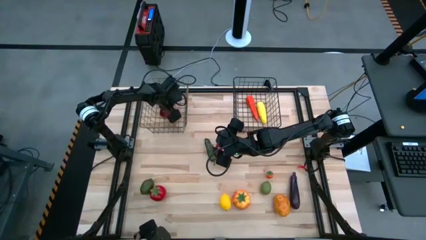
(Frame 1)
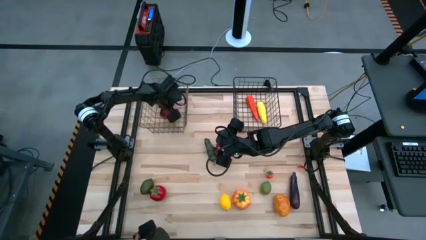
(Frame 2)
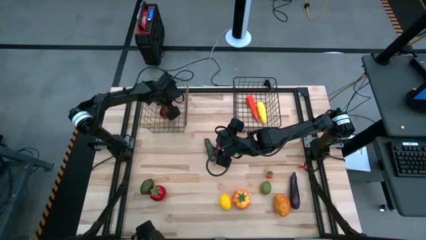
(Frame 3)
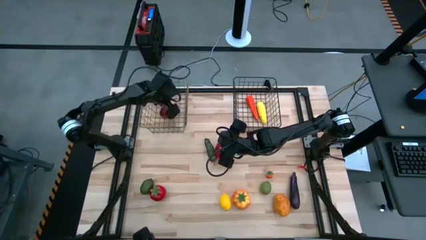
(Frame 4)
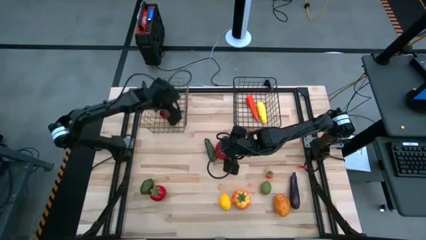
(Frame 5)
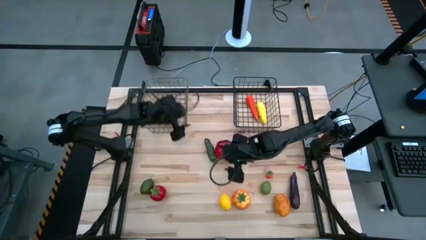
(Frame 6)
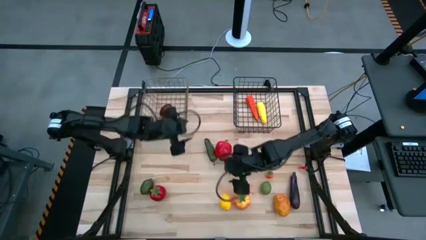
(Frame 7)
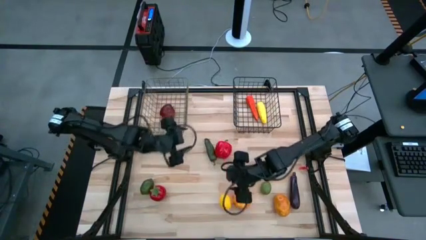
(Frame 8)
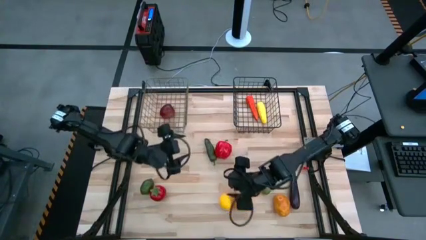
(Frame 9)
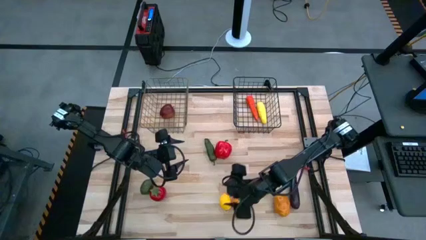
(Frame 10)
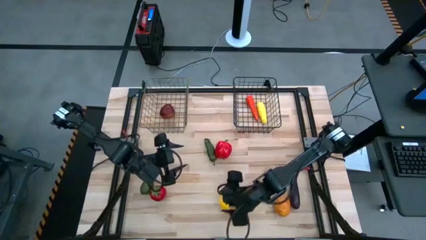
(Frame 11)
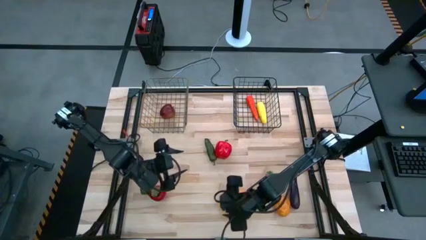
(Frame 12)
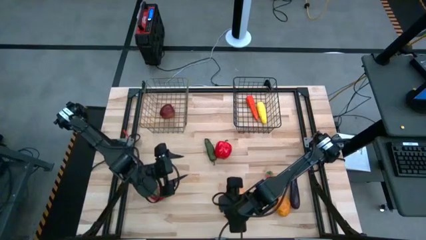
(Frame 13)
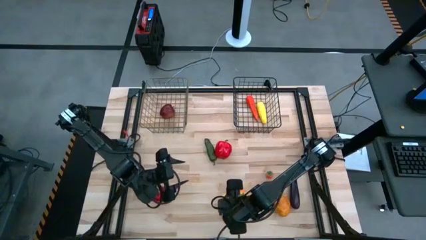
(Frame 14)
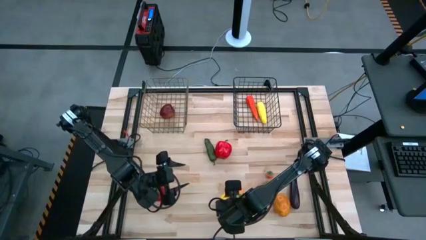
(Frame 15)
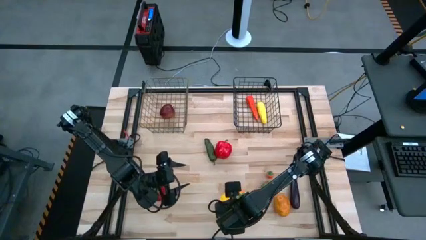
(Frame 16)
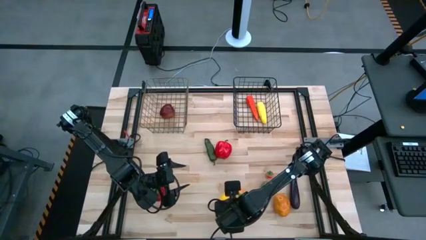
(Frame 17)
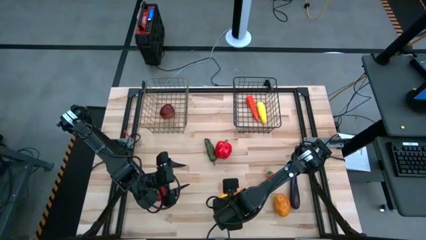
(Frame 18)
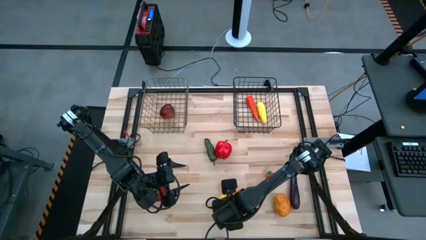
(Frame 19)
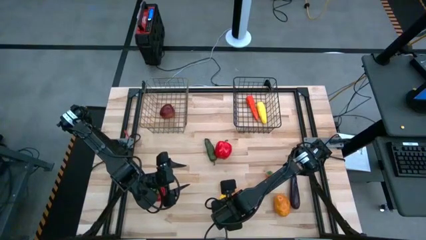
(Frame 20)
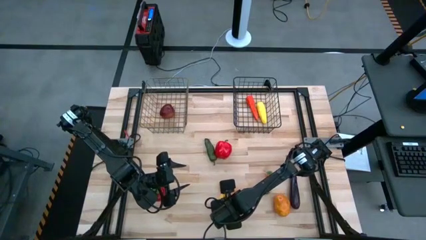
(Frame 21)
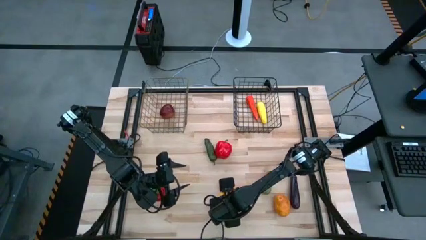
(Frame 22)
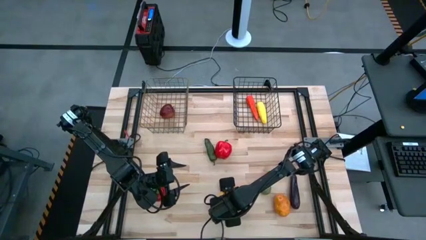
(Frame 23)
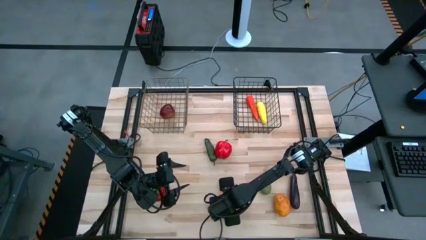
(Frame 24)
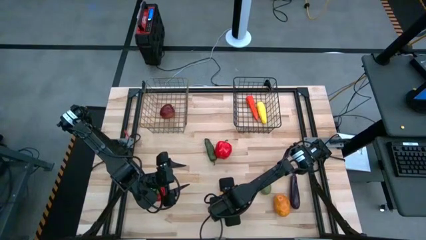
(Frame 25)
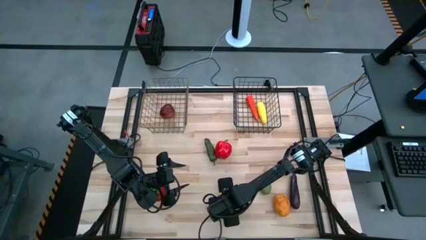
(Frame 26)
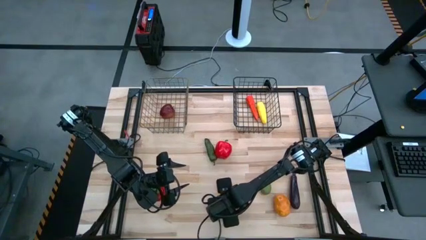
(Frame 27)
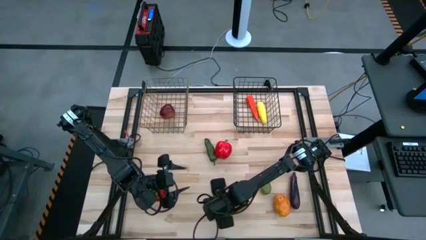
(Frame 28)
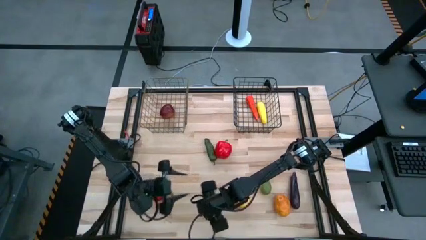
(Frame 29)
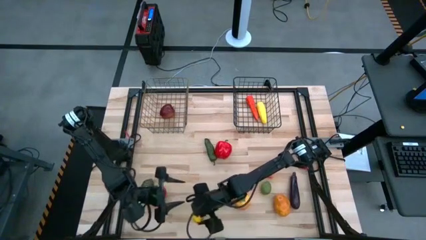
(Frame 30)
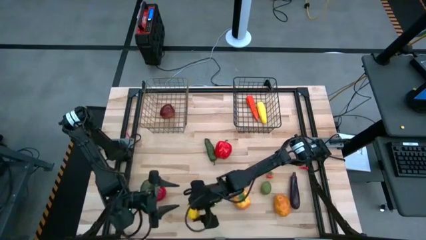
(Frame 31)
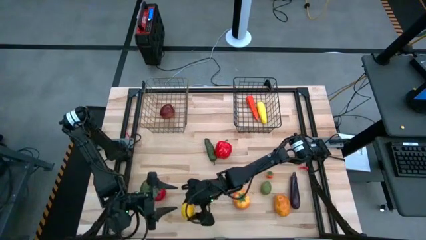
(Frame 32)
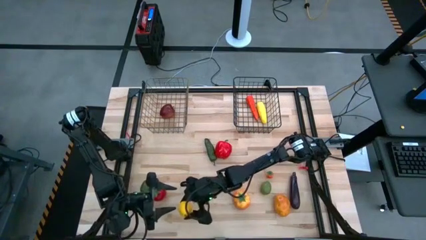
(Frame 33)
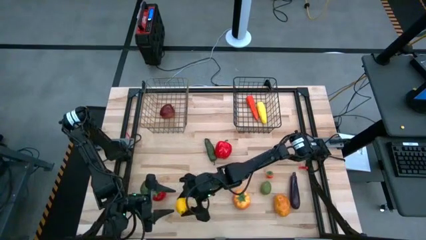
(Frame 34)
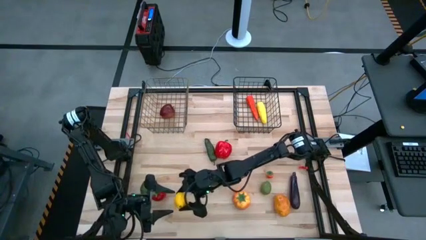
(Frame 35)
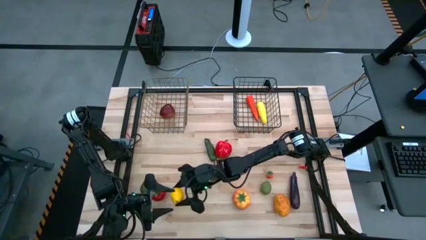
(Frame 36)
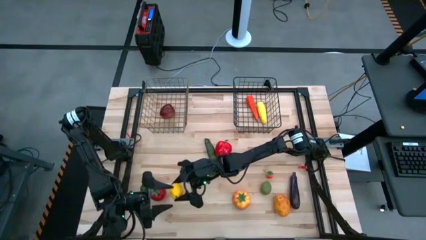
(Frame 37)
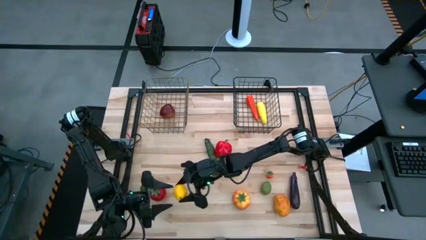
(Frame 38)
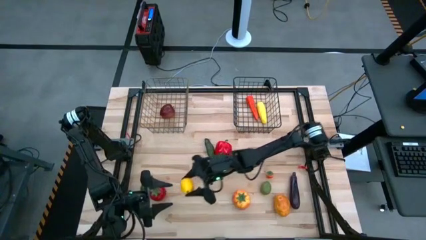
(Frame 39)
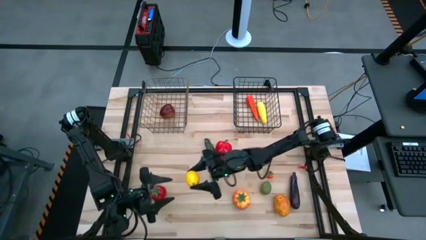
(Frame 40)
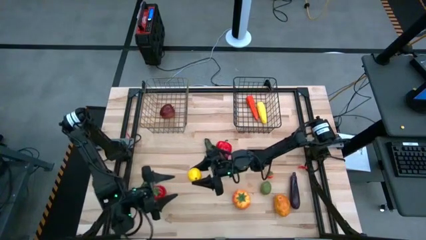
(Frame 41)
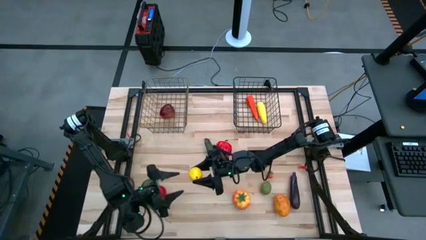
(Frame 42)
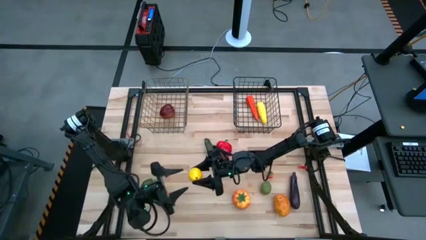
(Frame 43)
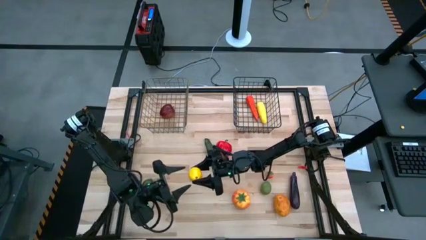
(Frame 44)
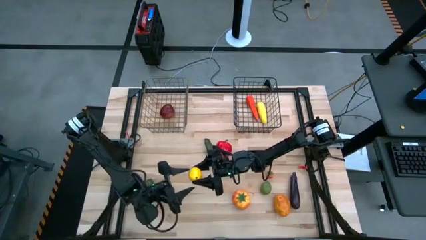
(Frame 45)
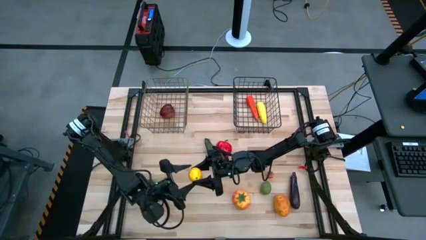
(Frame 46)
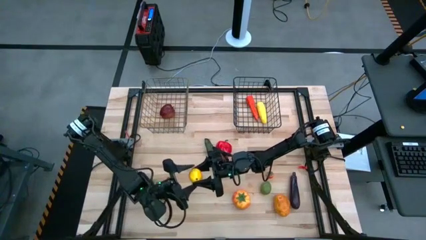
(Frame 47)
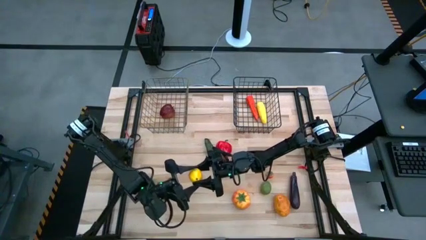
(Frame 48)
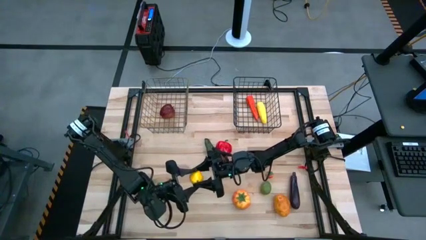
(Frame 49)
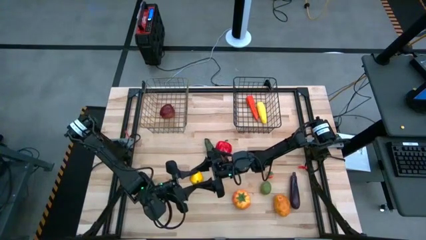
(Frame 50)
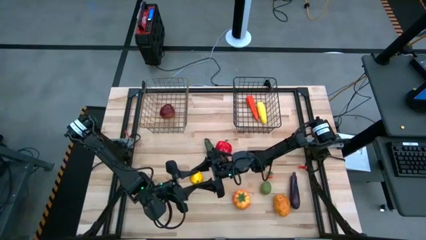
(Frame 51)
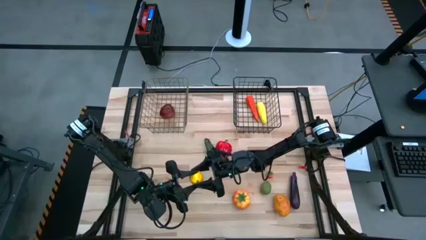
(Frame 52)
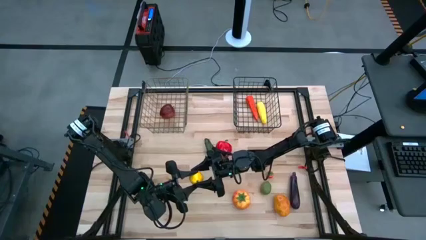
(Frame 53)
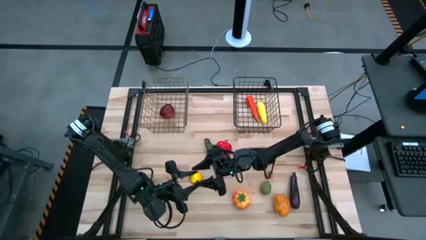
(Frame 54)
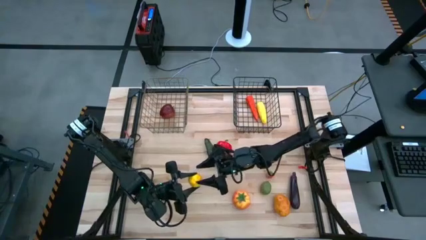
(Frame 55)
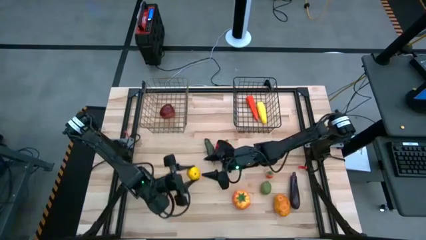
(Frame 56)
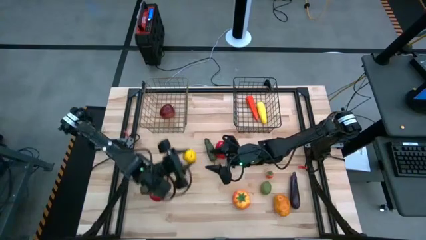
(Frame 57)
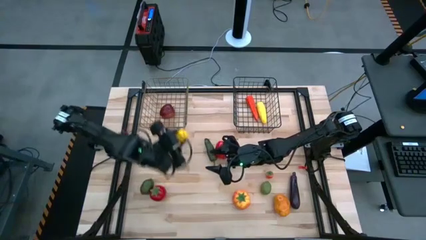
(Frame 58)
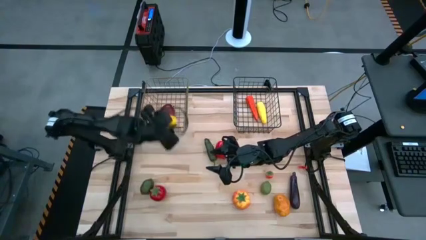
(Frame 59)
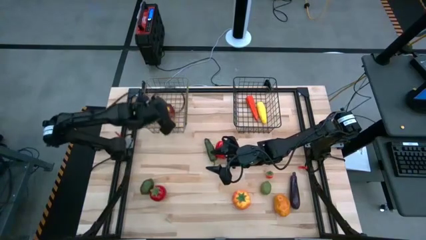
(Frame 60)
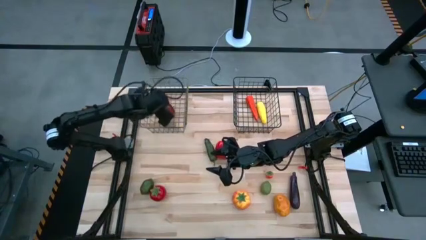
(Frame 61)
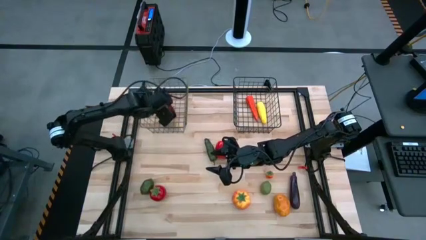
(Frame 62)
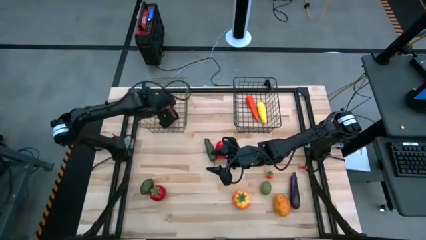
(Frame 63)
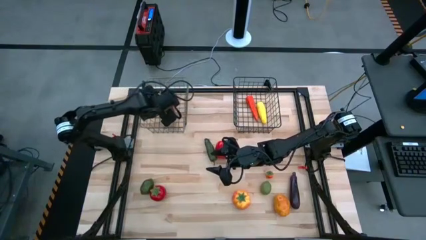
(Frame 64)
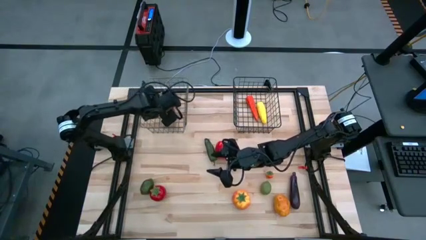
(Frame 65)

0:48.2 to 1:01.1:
Task: Sort produce into baskets
Put the yellow lemon into the left yellow wire basket

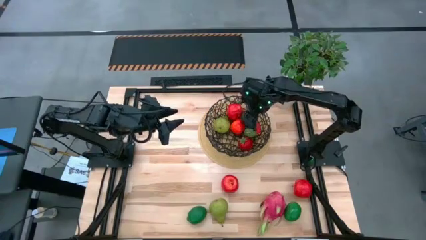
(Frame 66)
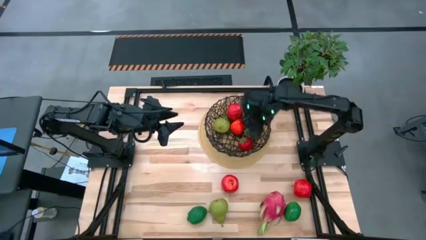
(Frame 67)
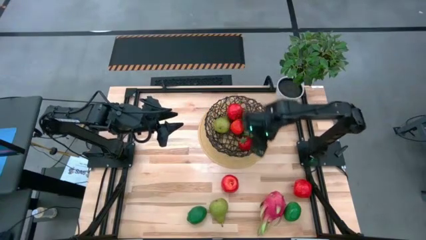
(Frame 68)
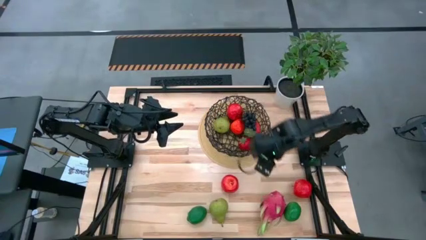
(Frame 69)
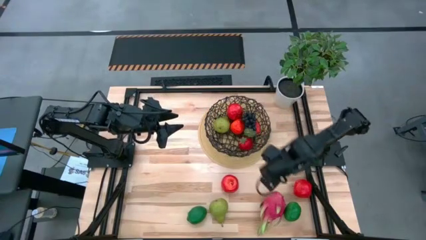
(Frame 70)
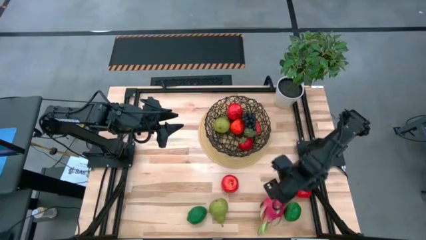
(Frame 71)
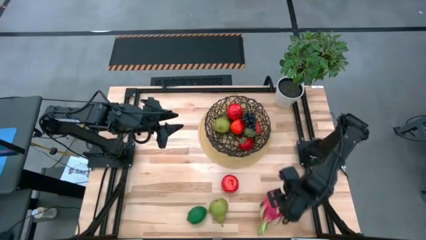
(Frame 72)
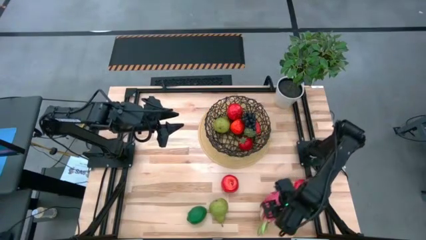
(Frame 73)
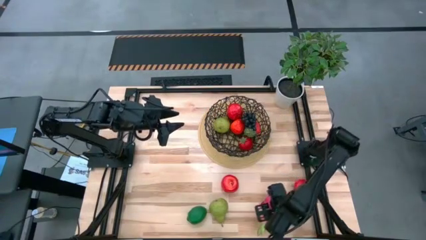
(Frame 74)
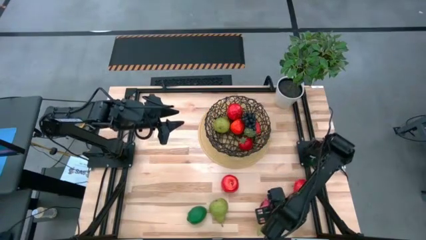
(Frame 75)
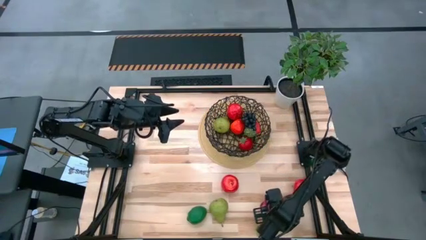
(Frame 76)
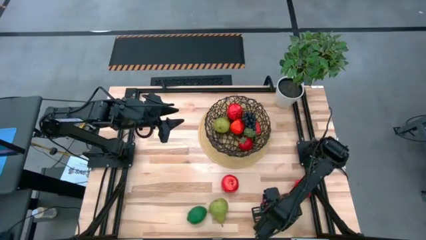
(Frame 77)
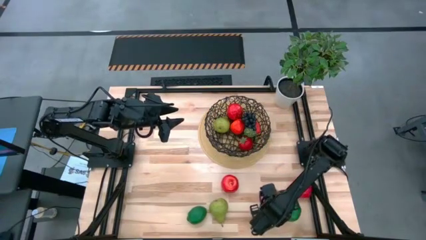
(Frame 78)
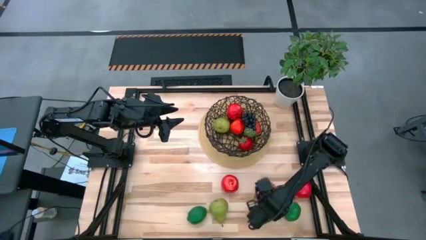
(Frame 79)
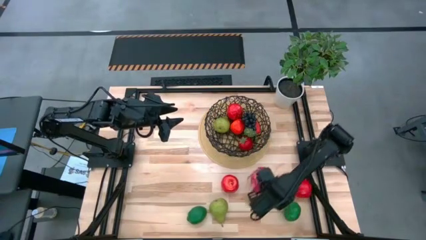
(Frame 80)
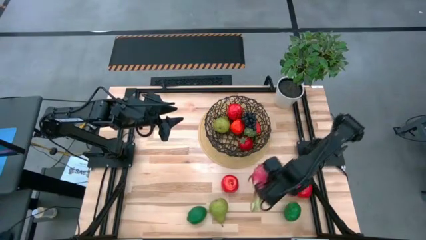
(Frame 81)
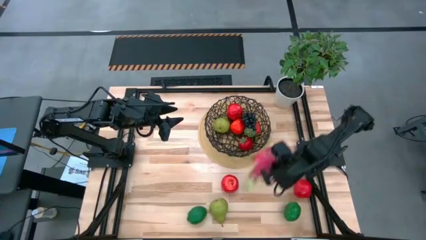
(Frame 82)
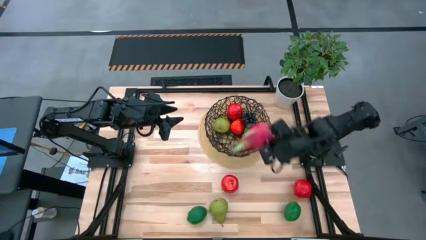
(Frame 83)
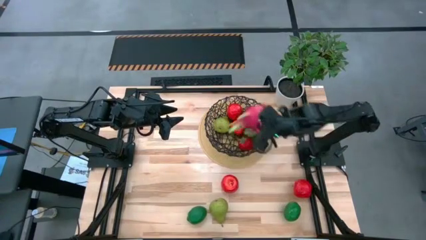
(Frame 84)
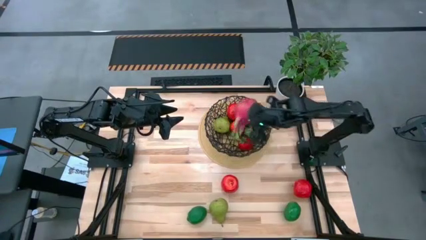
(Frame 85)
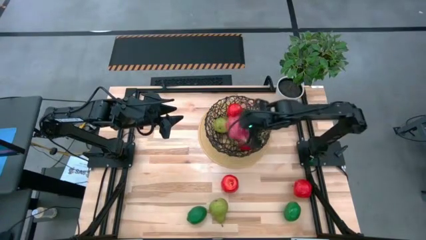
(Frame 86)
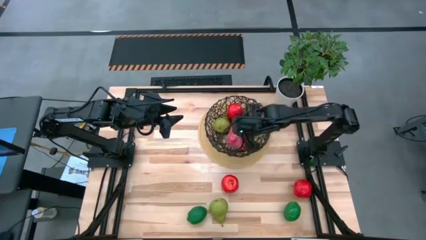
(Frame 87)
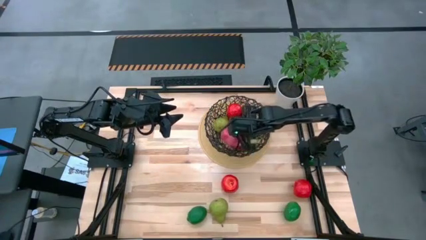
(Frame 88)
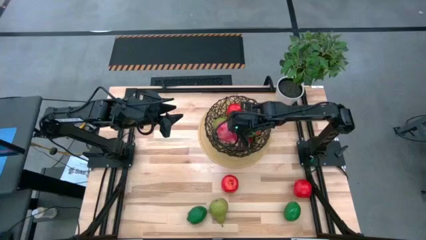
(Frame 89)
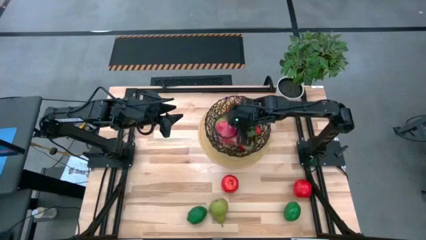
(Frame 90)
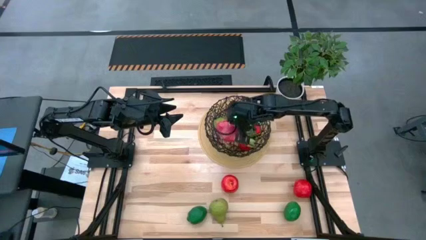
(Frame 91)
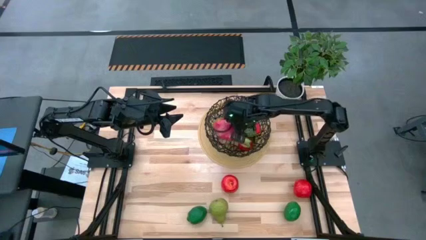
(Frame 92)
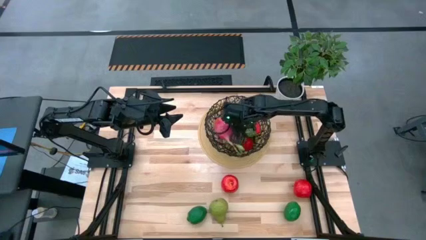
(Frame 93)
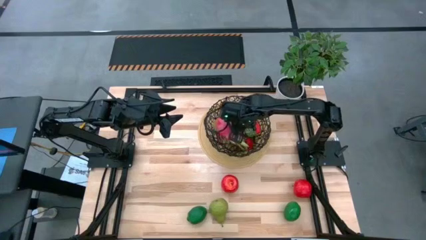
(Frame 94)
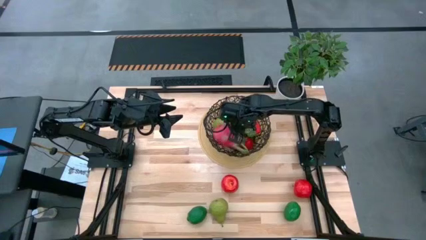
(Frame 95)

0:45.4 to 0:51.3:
Task: Build produce basket
Put the pink dragon fruit into the black basket
